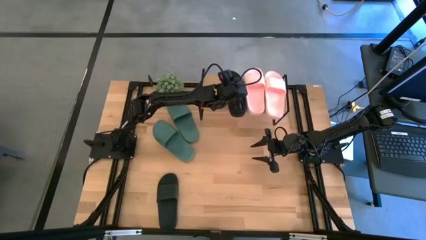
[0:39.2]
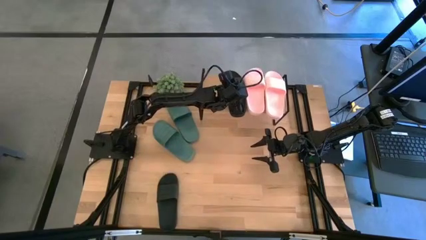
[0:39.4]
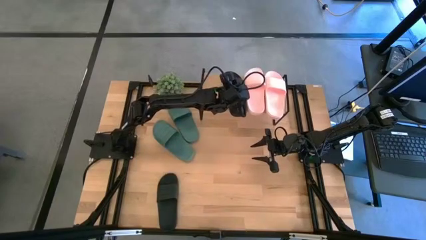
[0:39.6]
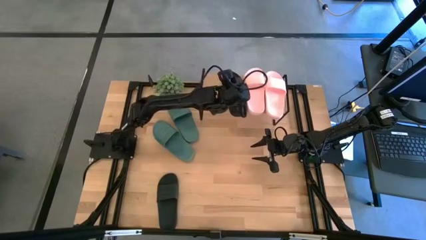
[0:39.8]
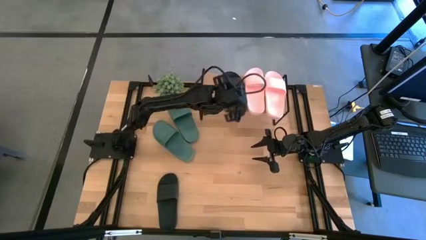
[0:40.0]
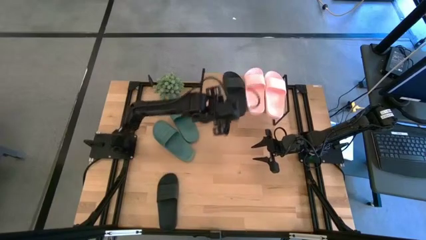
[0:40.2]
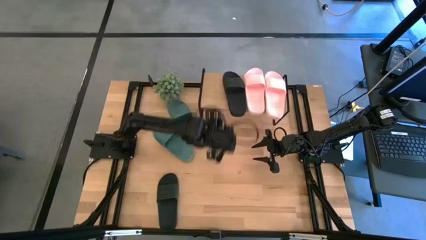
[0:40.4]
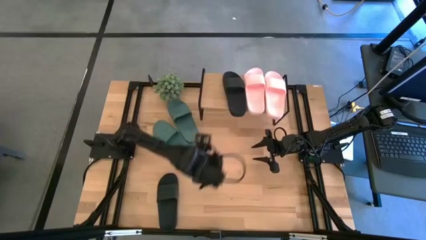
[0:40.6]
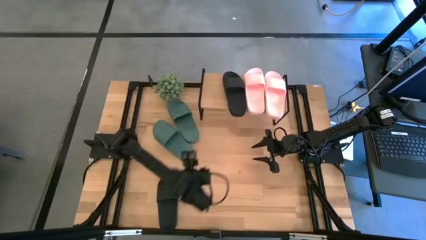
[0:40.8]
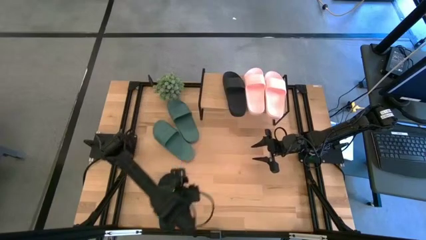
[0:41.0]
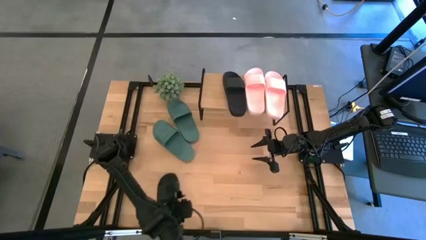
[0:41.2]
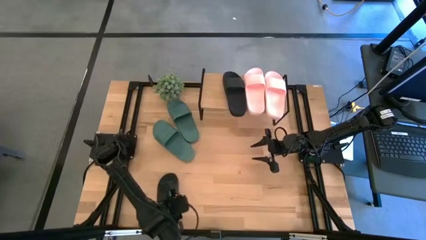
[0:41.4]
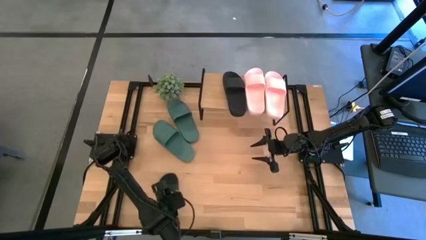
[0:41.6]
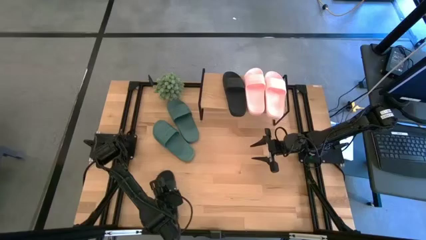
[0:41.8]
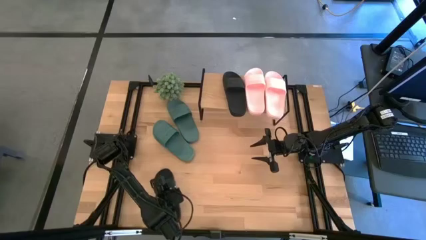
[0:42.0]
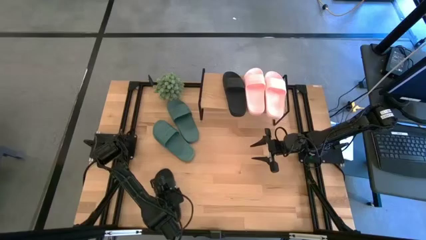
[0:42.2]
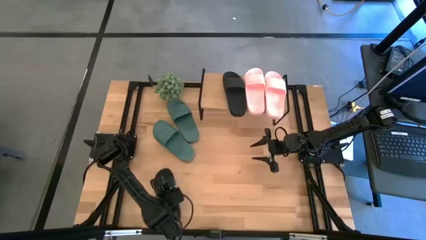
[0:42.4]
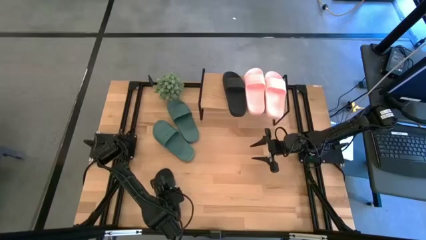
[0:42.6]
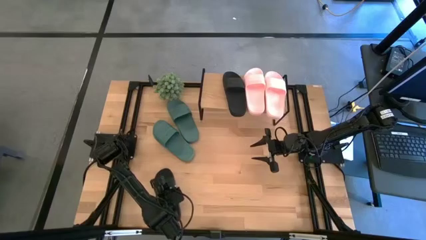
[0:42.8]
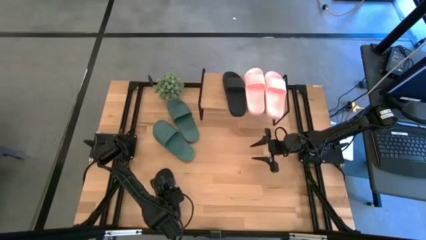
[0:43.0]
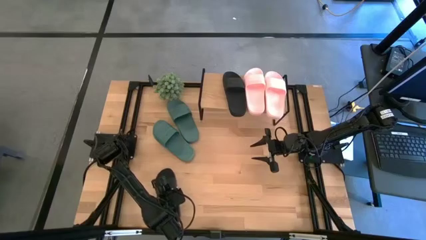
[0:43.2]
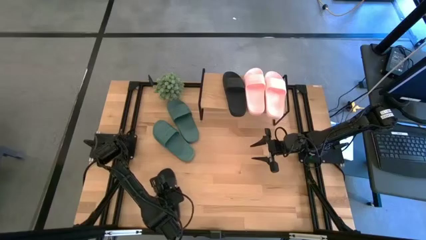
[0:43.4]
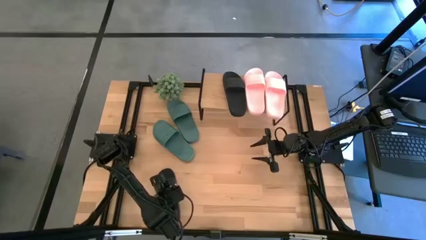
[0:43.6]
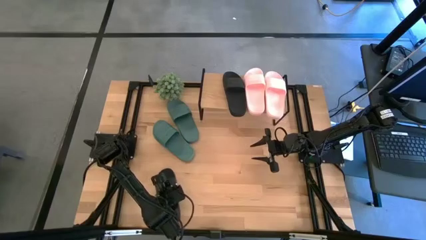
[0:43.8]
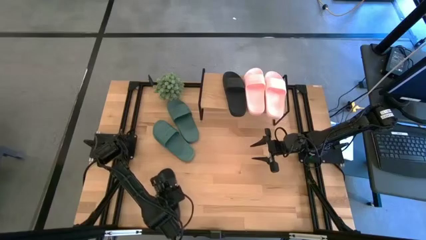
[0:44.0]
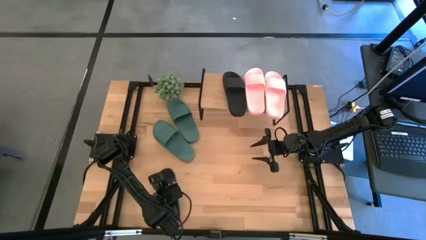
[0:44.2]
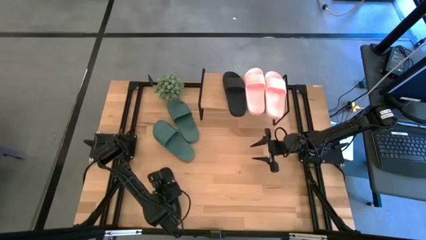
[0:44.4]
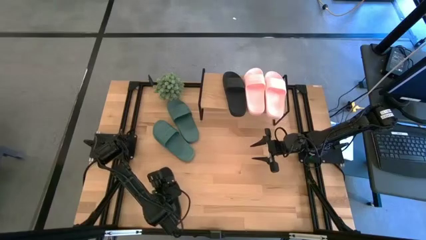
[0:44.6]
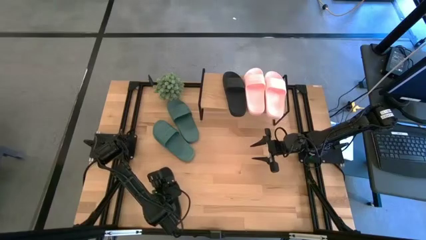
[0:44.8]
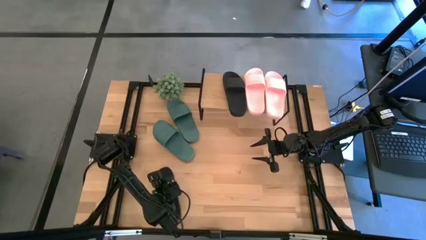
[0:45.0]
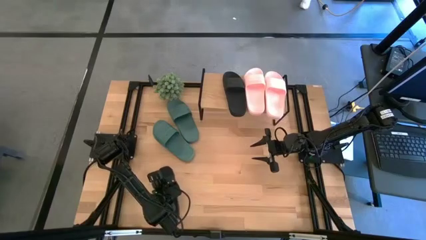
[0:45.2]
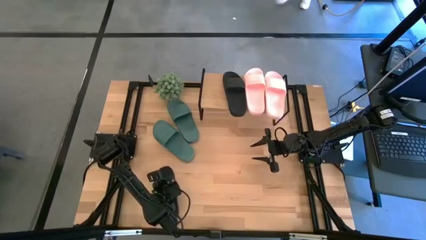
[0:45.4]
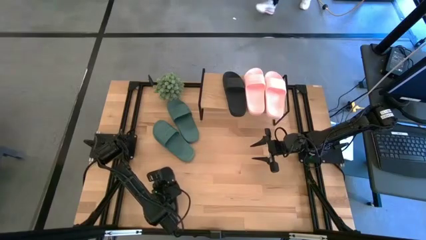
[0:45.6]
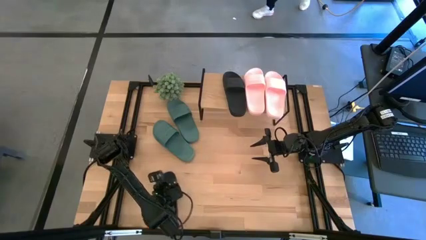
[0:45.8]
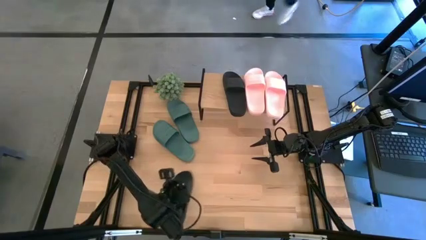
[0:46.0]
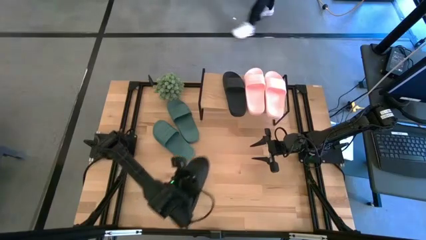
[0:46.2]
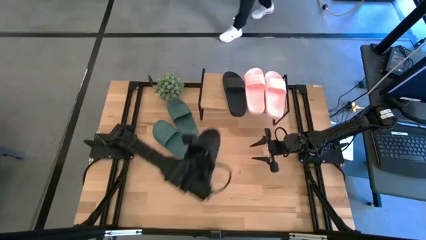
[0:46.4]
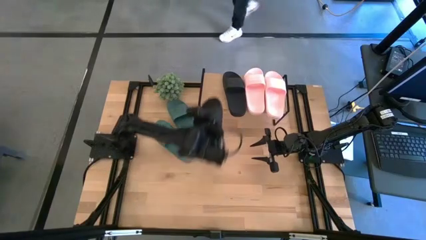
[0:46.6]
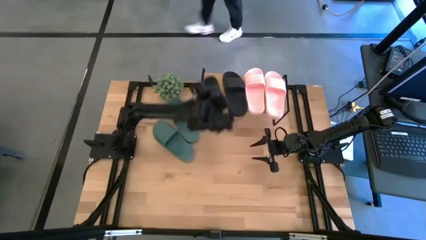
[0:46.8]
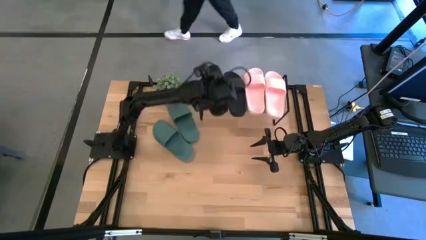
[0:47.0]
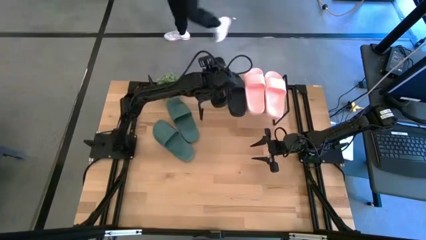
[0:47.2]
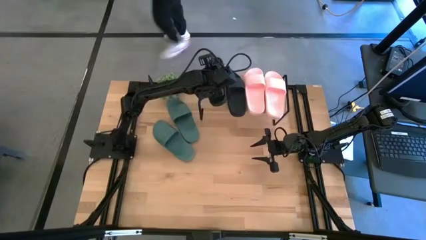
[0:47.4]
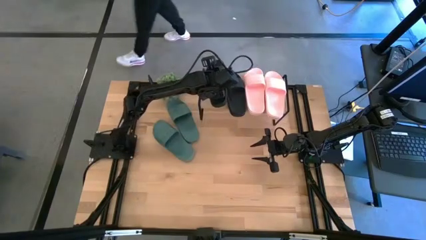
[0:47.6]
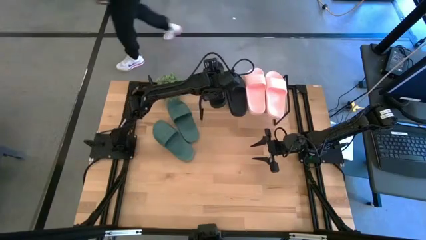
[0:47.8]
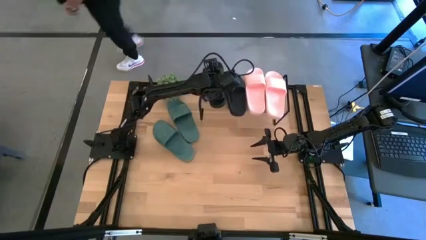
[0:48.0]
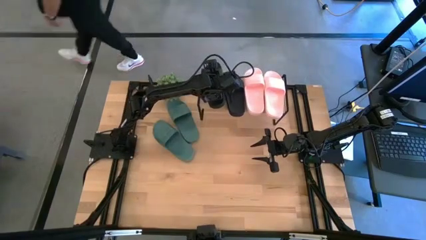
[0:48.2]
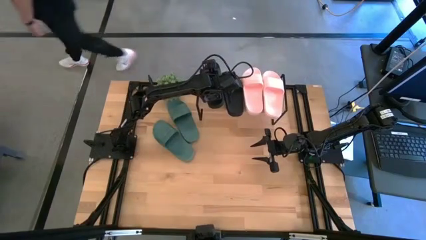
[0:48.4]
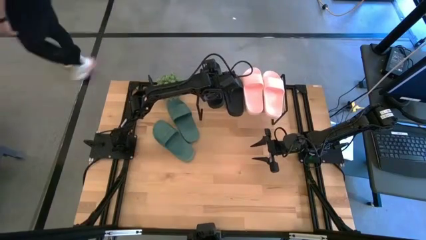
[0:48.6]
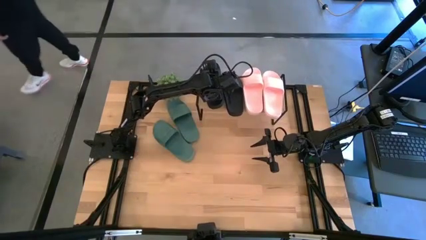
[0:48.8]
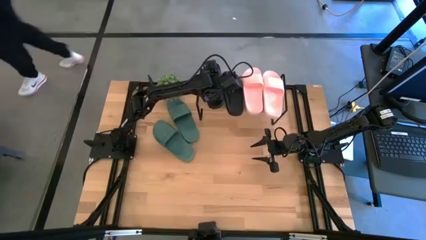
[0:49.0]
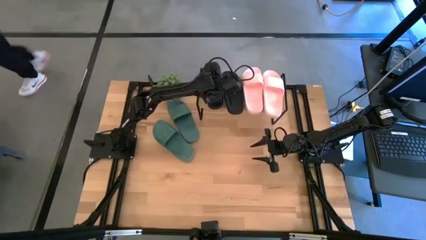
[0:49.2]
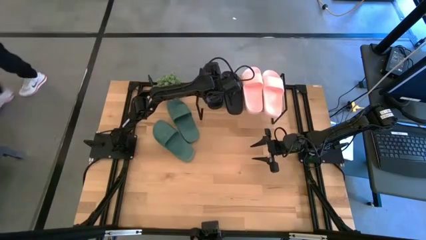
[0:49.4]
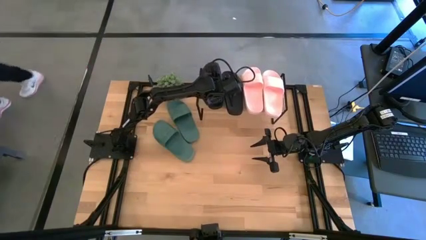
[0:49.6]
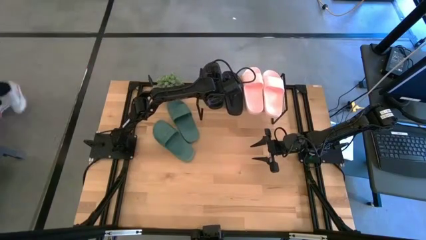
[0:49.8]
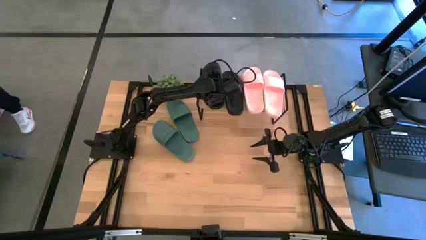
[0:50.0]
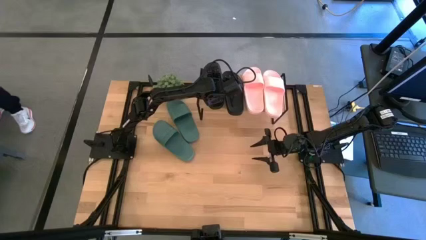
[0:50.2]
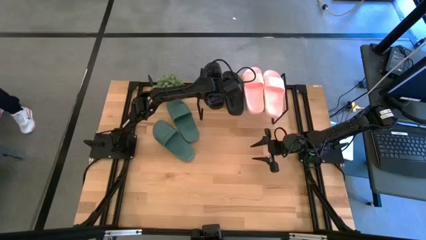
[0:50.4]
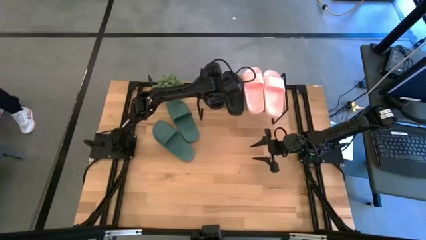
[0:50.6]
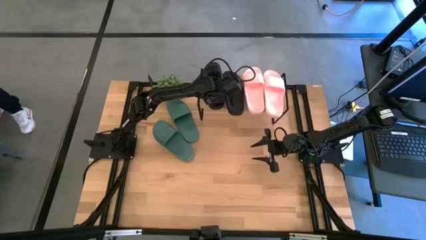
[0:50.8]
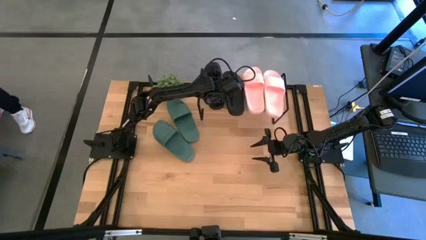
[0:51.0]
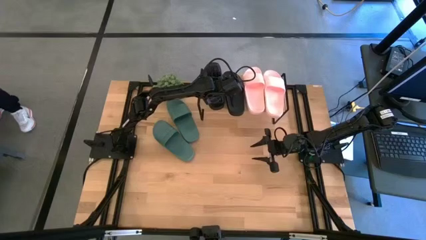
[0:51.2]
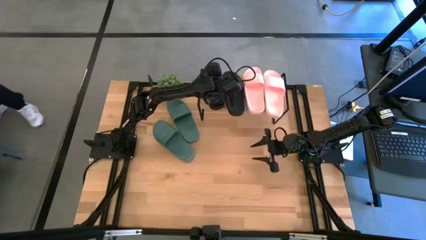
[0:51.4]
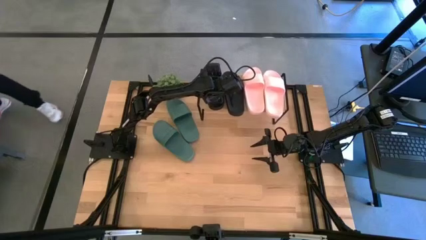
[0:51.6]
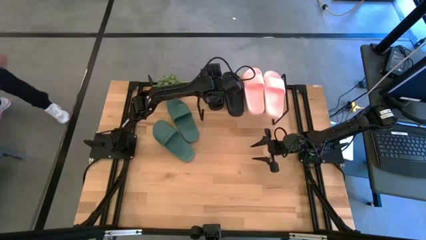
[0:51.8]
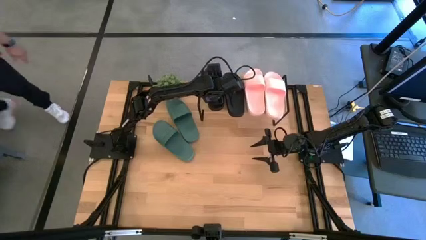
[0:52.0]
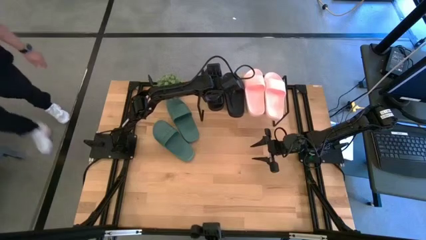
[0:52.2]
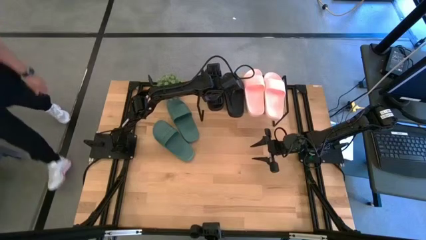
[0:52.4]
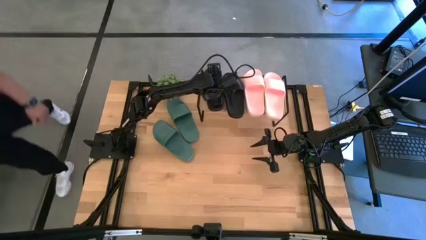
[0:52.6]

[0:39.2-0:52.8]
Task: Pick and place slides into the shelf
Put the black slide on the shelf
